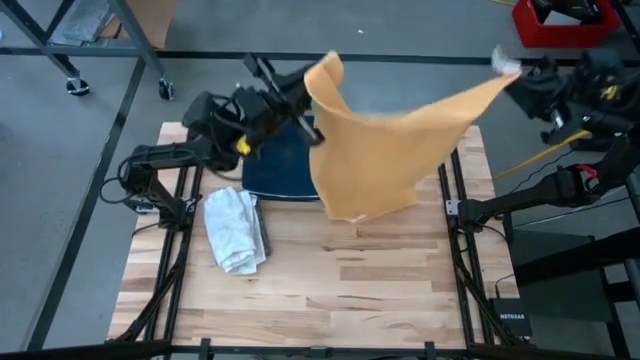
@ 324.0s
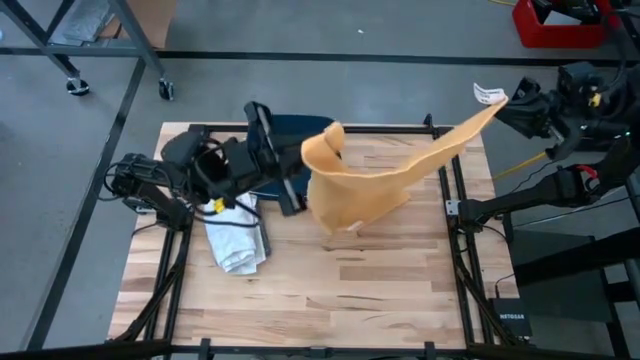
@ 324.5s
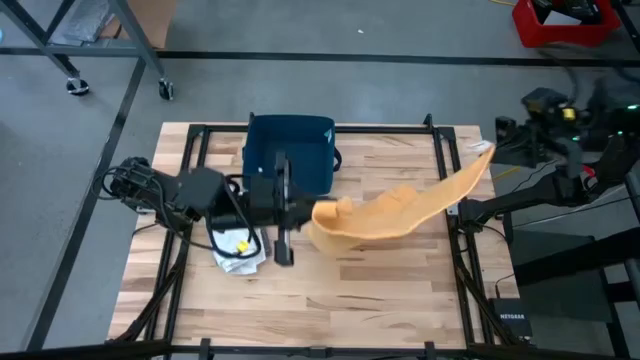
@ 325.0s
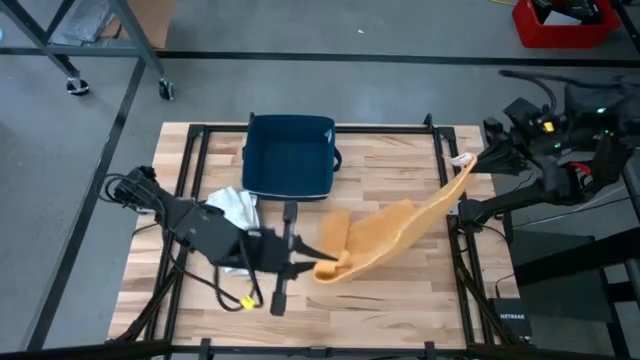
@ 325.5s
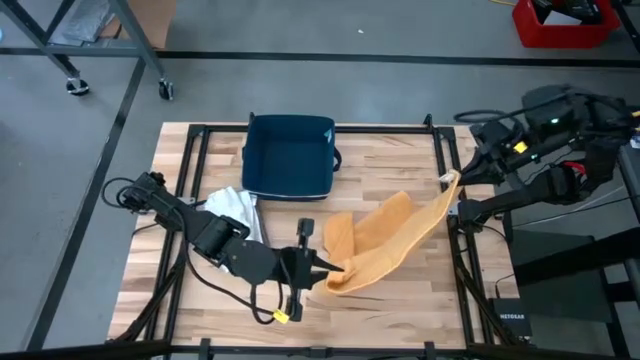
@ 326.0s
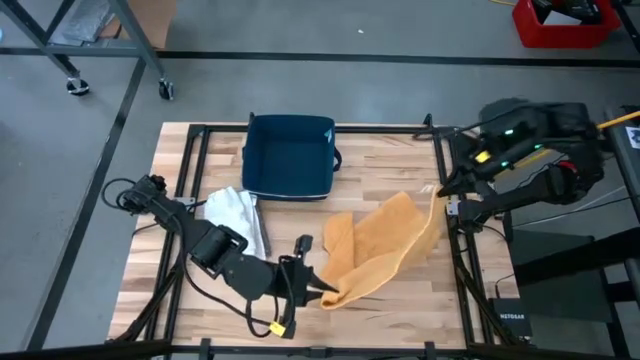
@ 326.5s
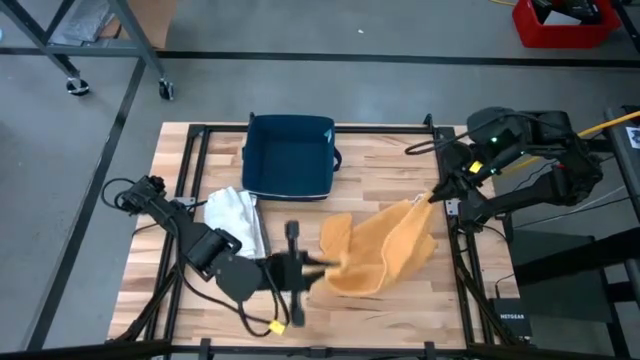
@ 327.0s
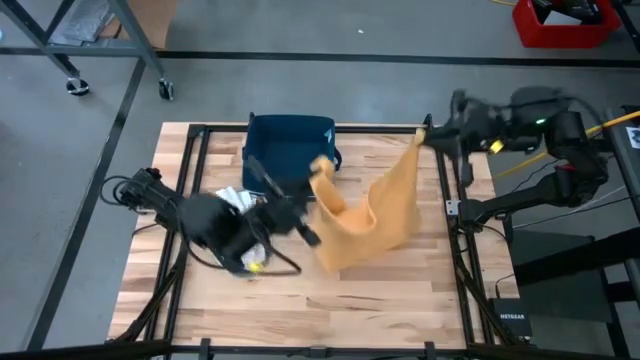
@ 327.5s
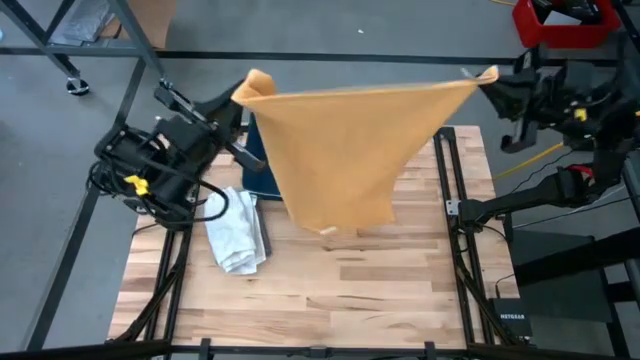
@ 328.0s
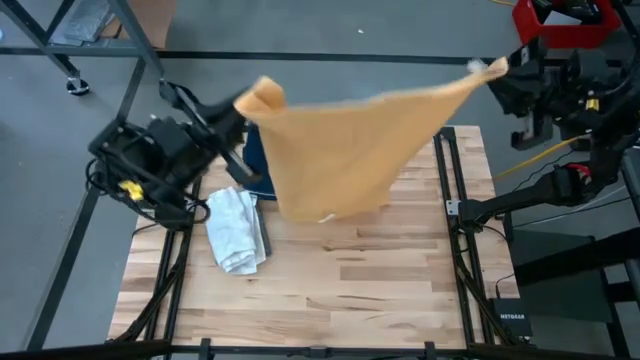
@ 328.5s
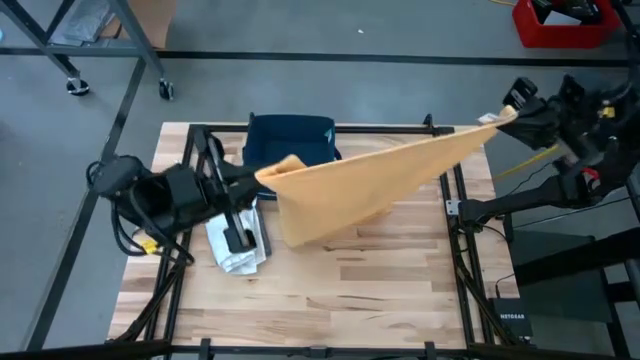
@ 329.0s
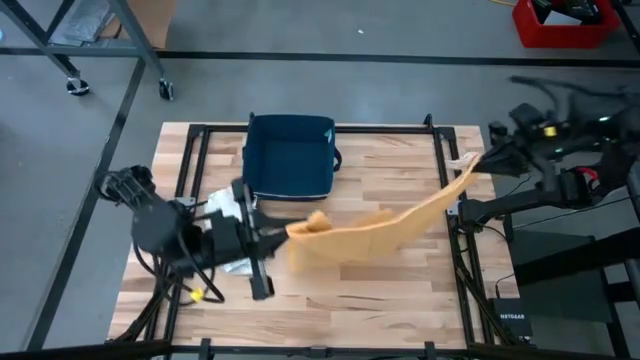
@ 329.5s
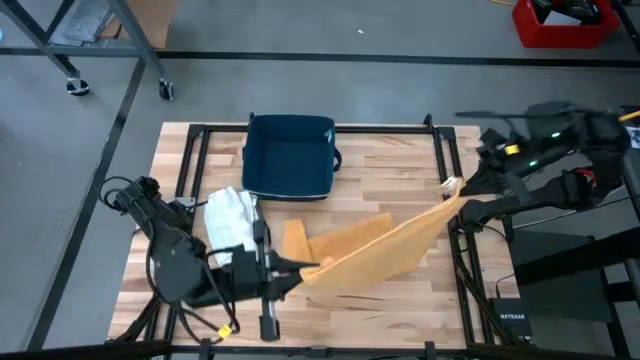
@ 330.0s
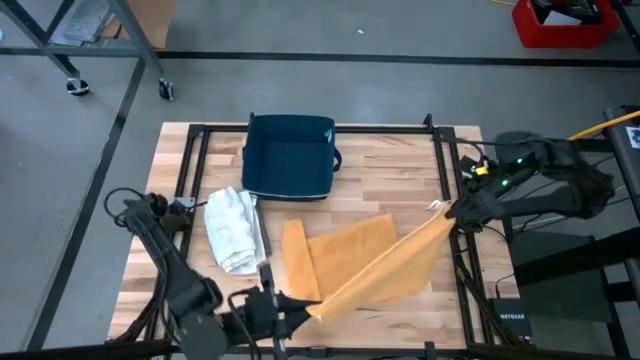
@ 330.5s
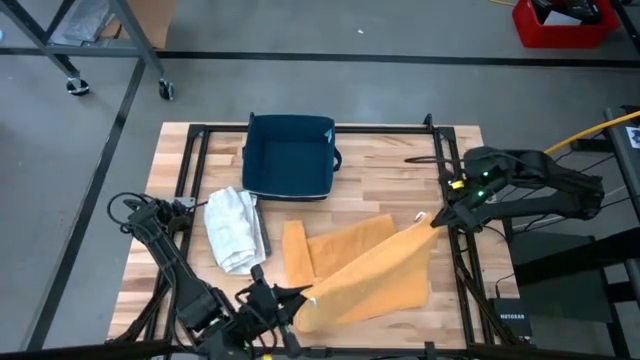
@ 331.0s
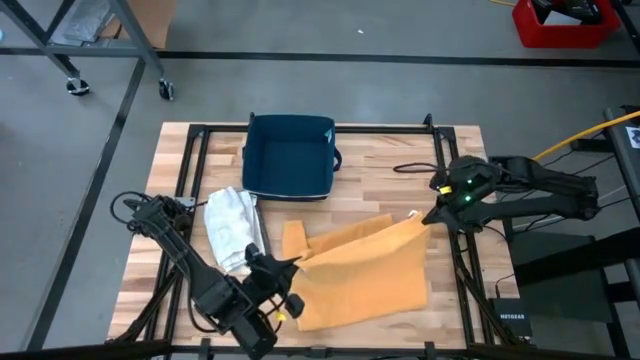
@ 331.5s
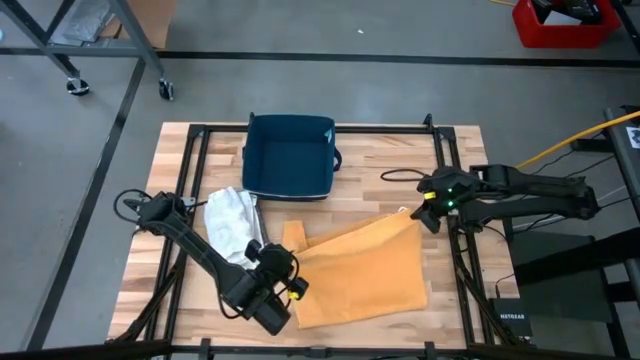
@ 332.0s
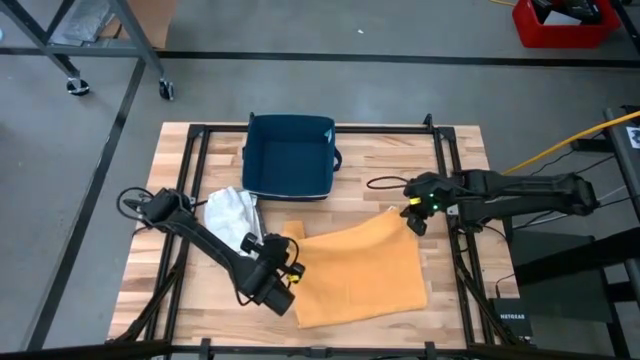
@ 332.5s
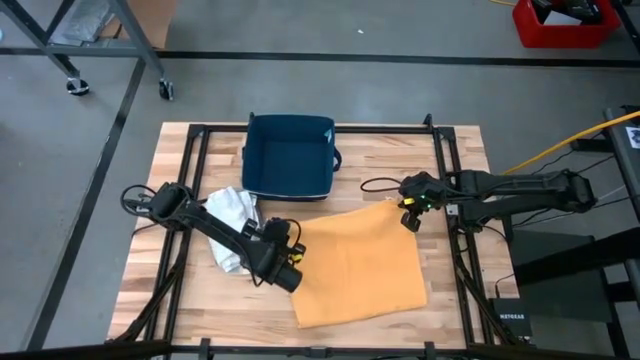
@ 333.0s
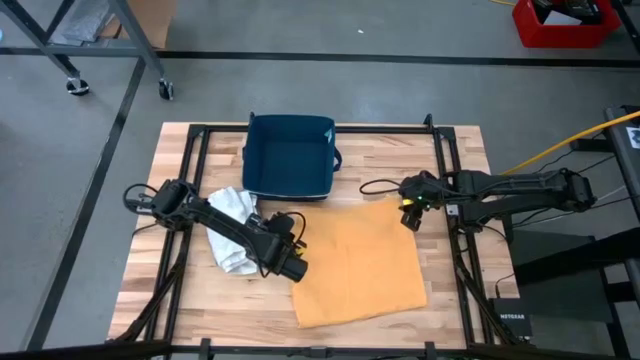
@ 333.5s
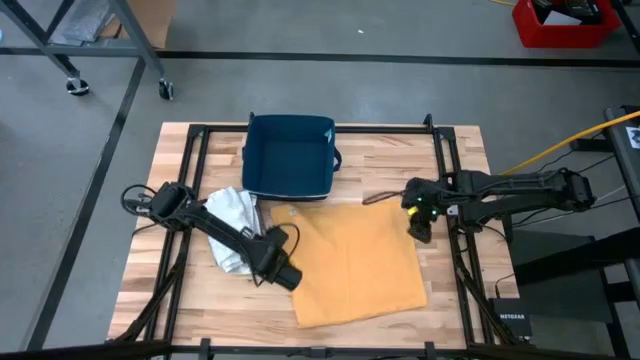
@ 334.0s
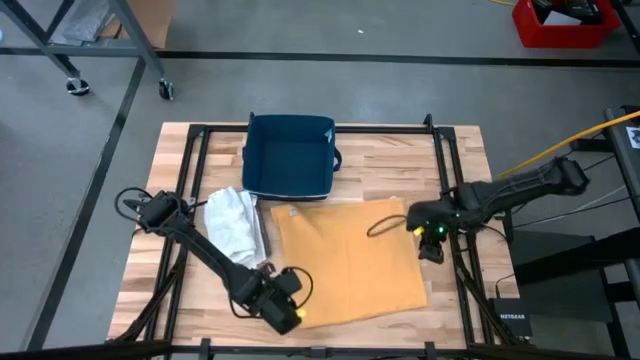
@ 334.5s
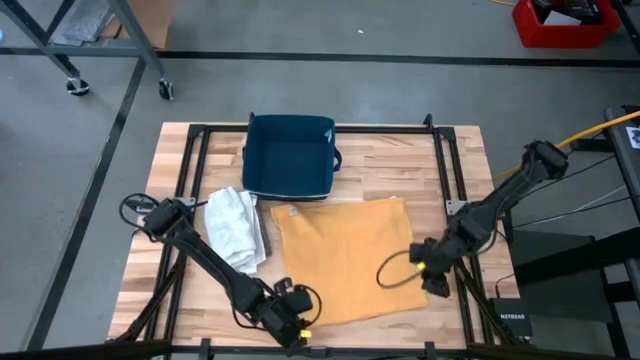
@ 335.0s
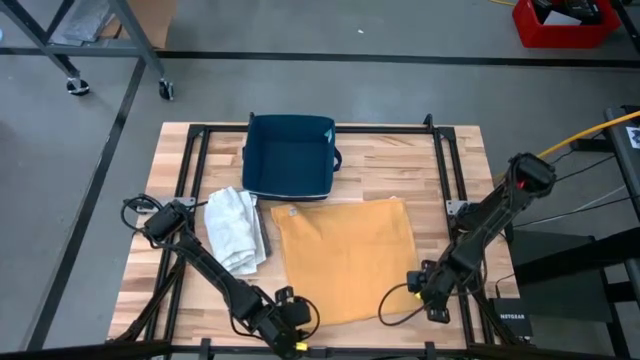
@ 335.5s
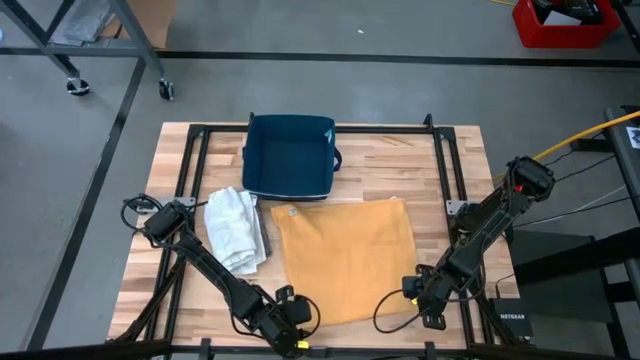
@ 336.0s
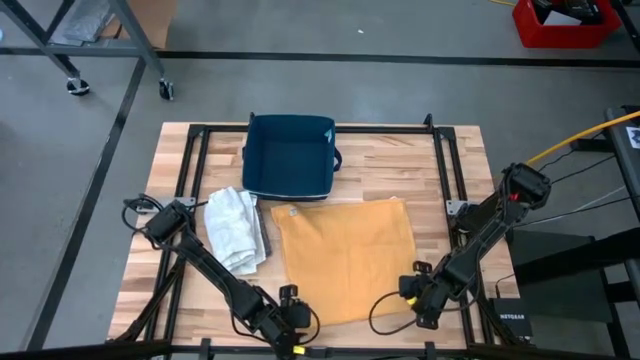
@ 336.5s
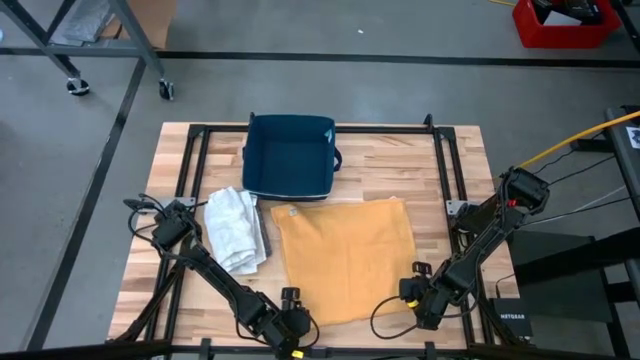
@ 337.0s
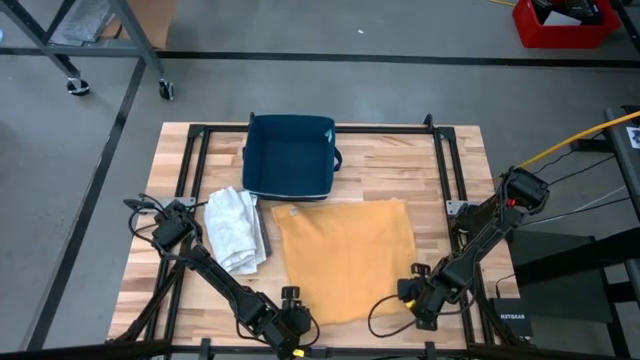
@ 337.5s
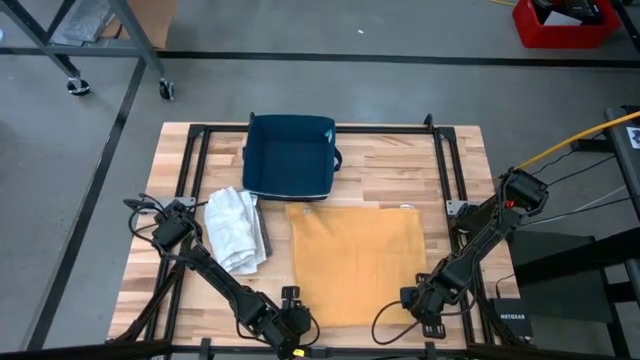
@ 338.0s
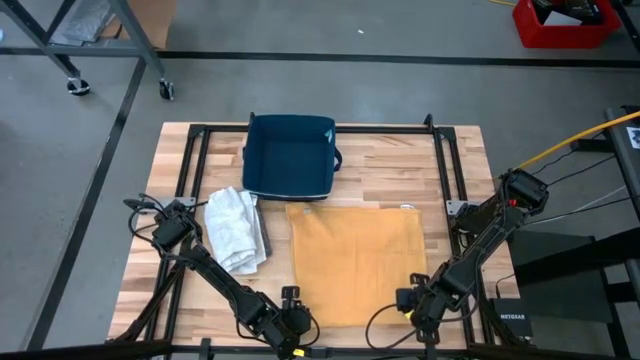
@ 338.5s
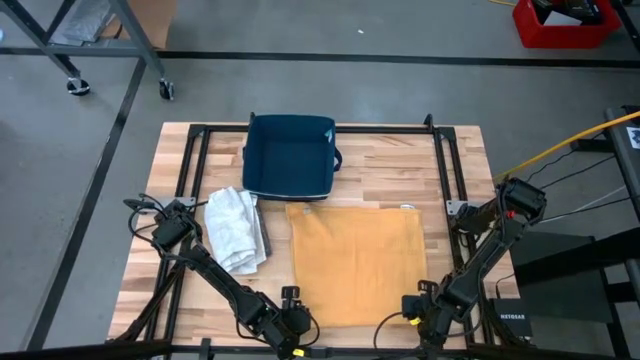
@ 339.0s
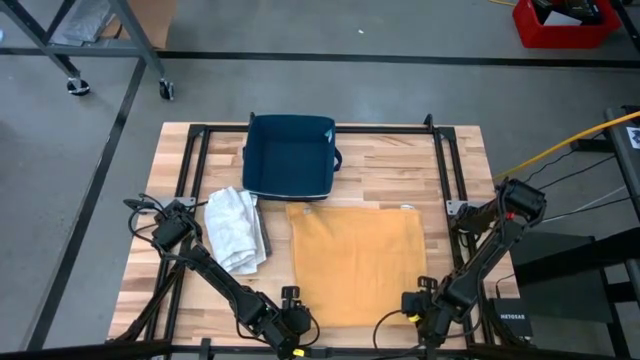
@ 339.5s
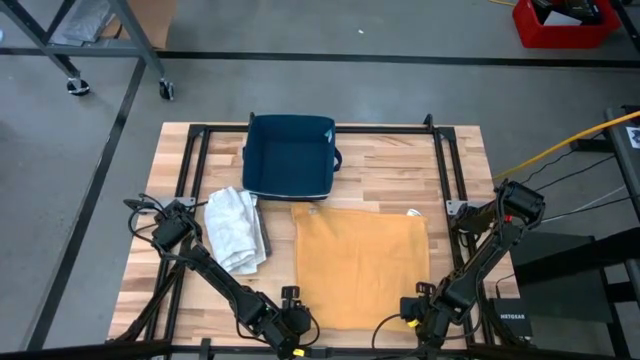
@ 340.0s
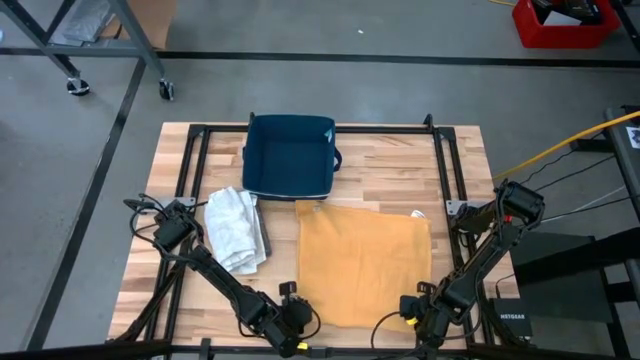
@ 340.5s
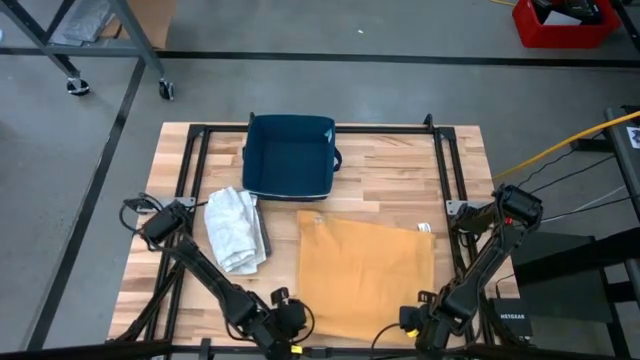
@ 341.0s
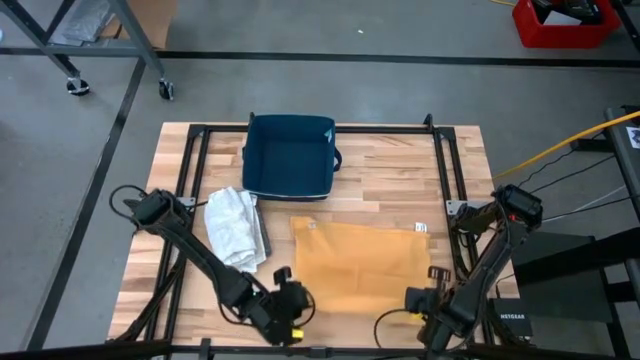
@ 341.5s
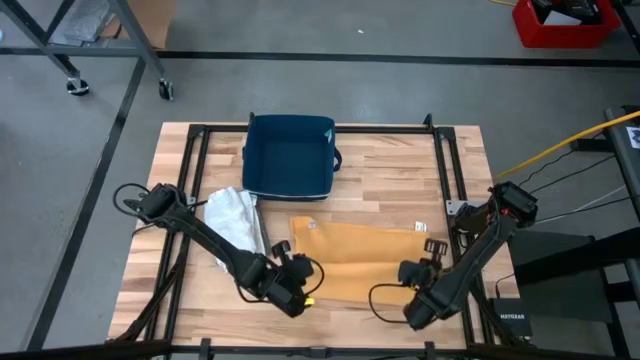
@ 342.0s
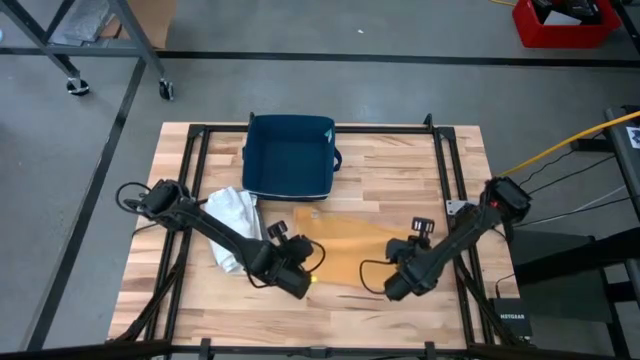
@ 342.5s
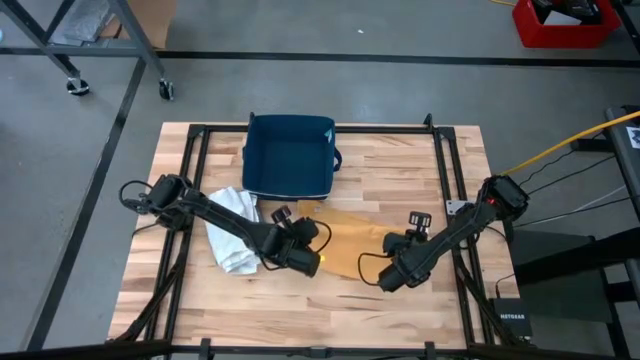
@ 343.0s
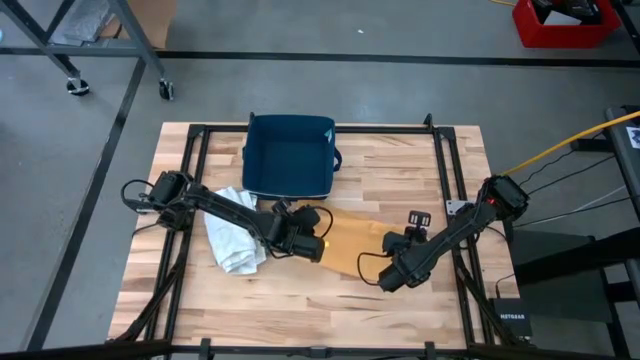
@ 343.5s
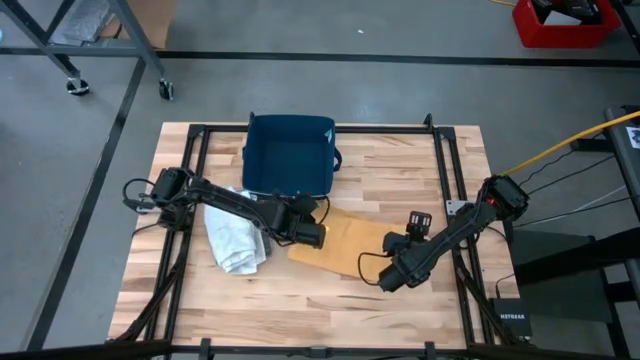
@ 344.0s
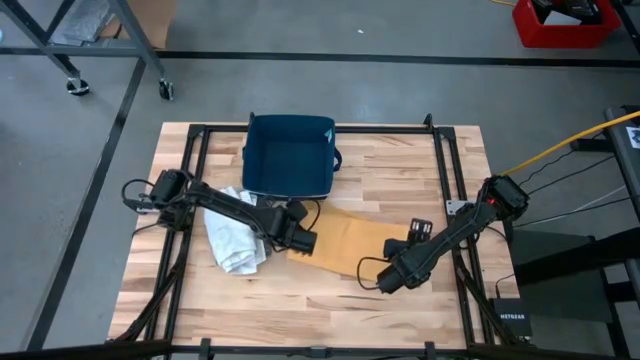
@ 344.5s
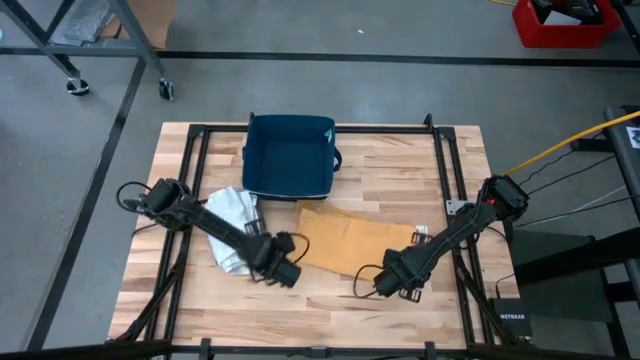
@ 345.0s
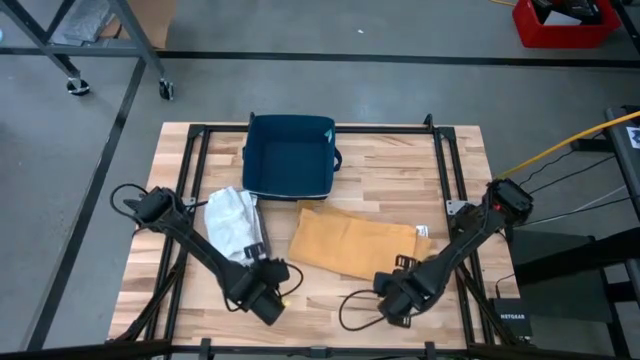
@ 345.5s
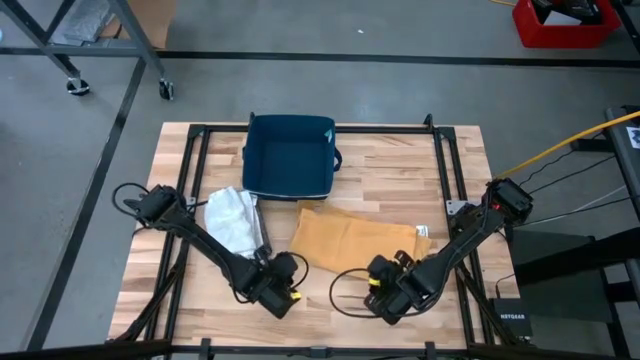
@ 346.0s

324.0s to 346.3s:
Task: Fold towel
Fold the yellow towel
